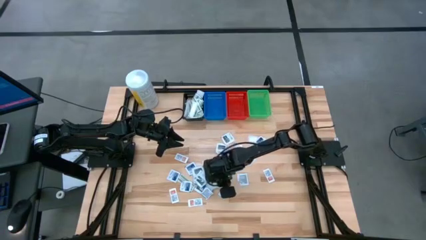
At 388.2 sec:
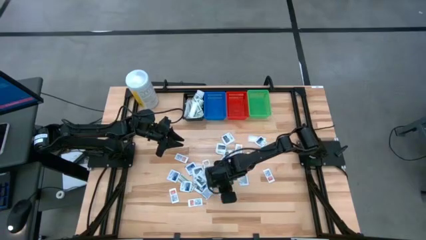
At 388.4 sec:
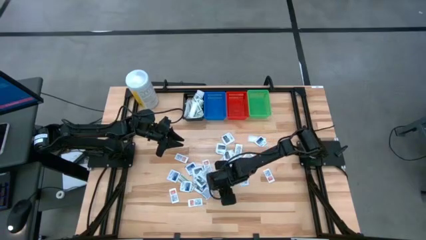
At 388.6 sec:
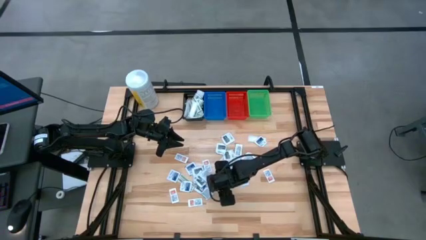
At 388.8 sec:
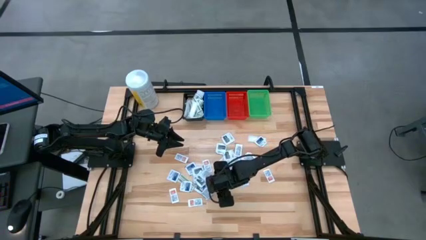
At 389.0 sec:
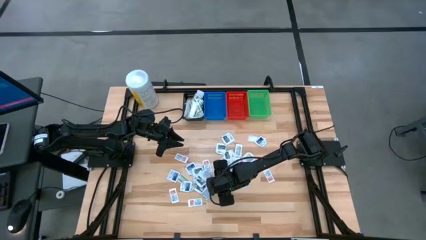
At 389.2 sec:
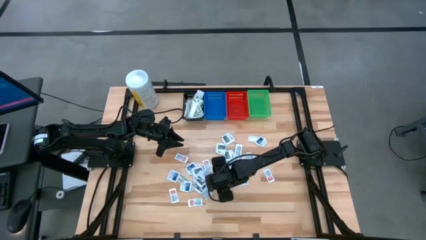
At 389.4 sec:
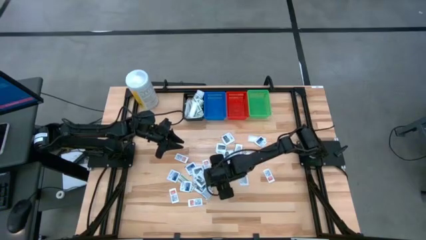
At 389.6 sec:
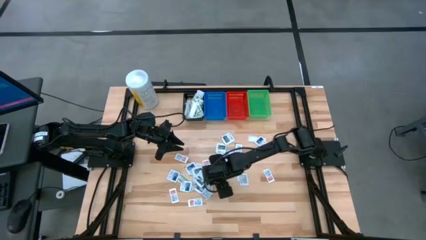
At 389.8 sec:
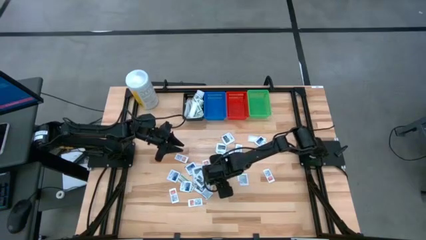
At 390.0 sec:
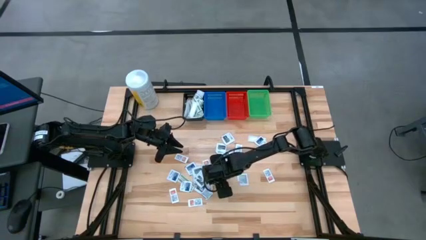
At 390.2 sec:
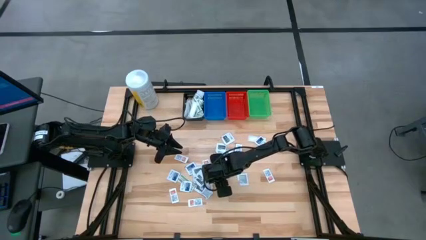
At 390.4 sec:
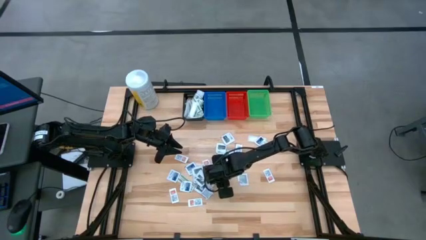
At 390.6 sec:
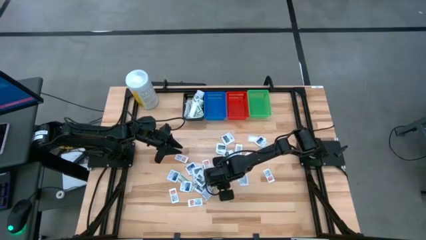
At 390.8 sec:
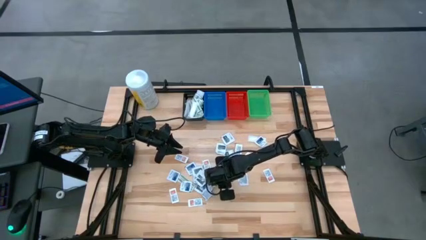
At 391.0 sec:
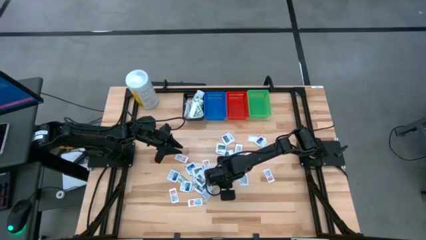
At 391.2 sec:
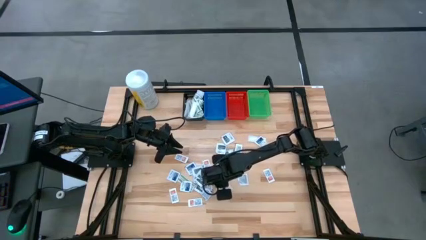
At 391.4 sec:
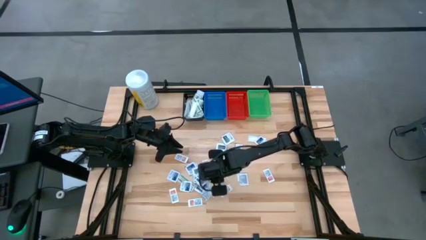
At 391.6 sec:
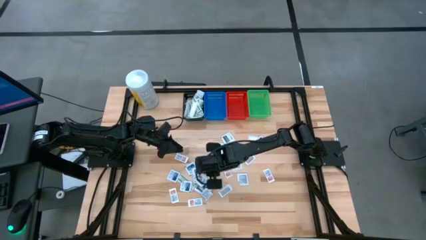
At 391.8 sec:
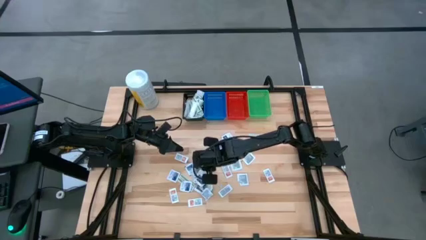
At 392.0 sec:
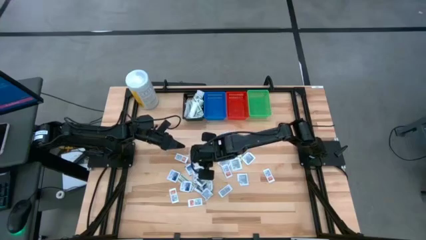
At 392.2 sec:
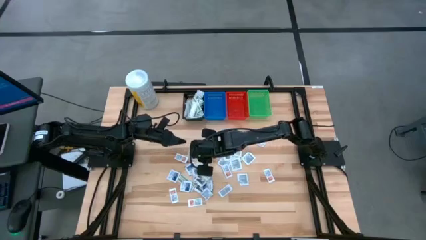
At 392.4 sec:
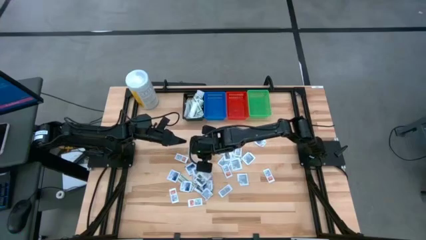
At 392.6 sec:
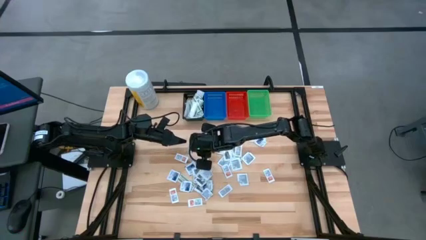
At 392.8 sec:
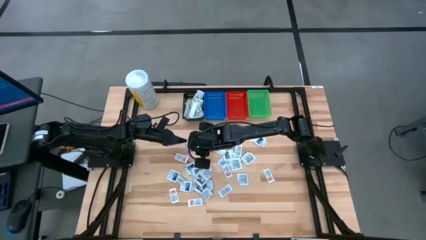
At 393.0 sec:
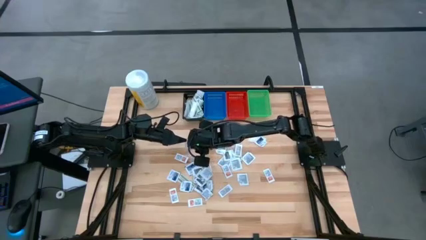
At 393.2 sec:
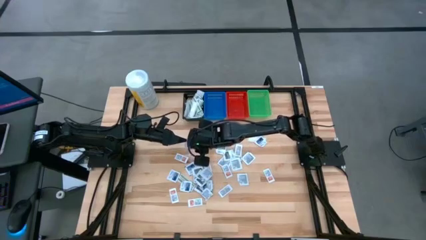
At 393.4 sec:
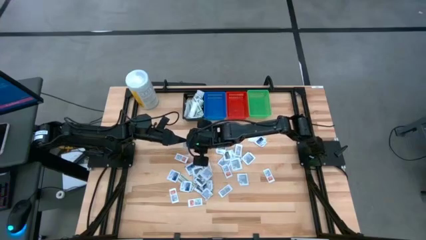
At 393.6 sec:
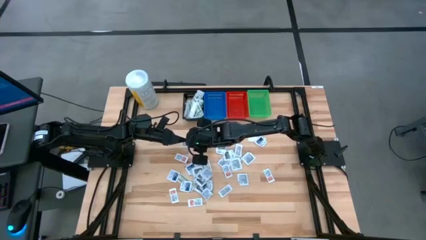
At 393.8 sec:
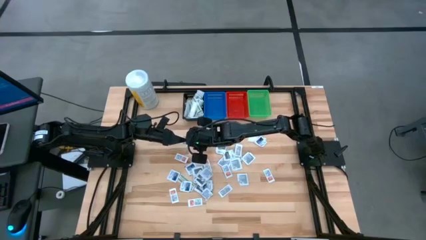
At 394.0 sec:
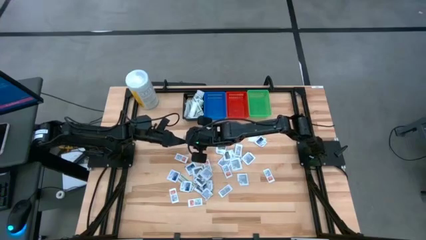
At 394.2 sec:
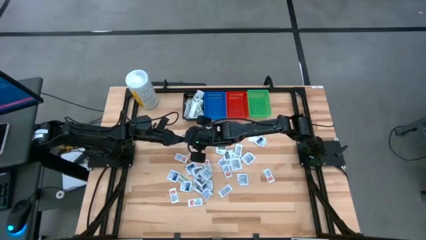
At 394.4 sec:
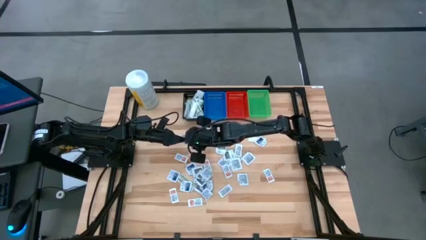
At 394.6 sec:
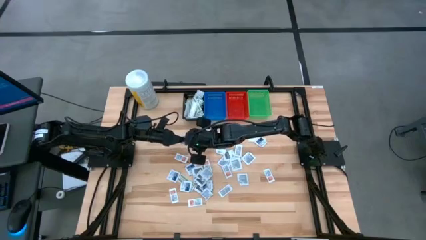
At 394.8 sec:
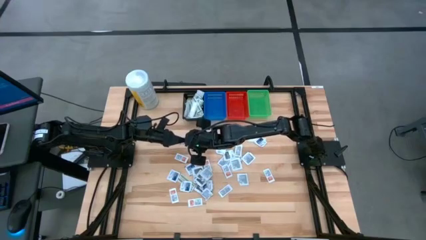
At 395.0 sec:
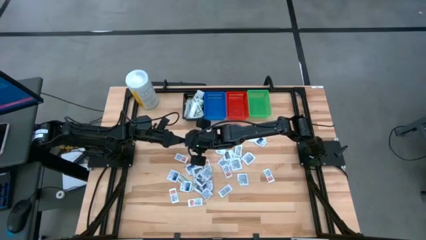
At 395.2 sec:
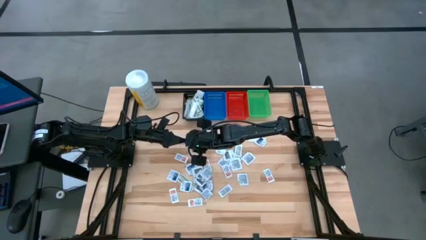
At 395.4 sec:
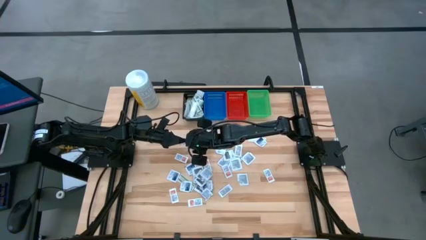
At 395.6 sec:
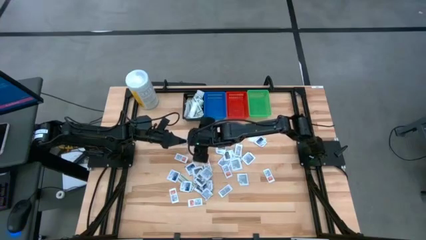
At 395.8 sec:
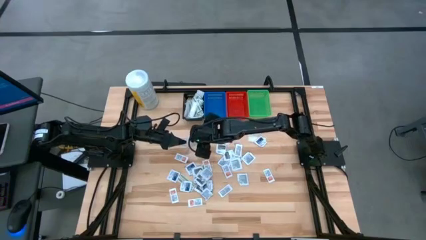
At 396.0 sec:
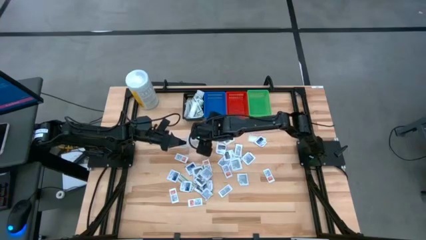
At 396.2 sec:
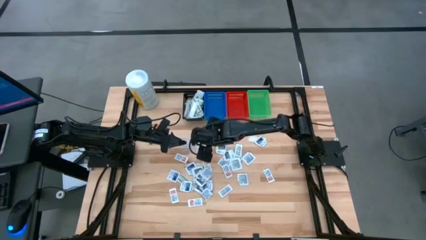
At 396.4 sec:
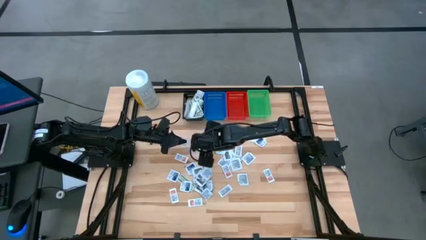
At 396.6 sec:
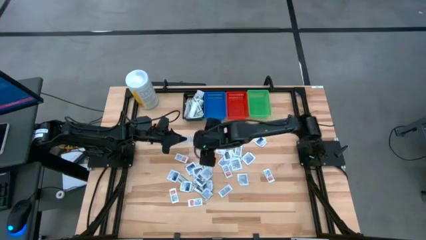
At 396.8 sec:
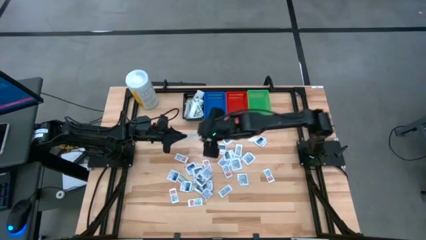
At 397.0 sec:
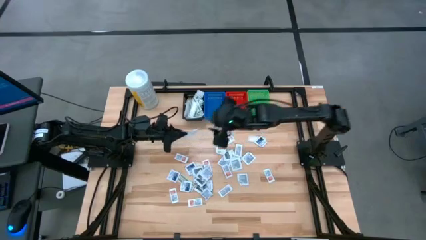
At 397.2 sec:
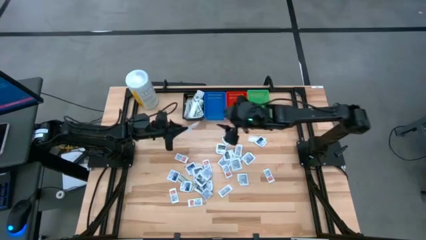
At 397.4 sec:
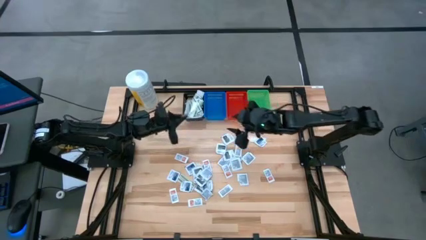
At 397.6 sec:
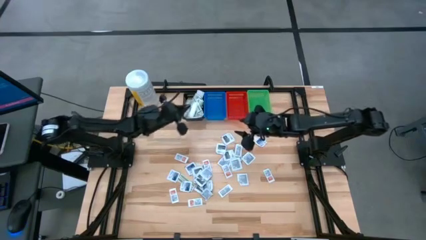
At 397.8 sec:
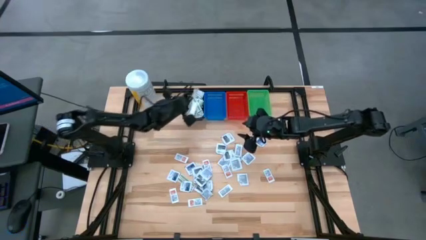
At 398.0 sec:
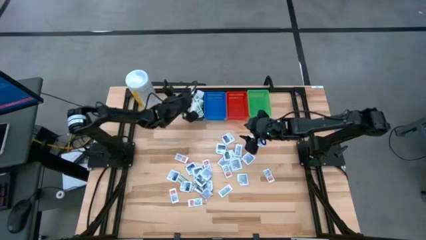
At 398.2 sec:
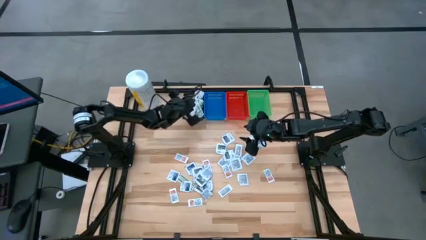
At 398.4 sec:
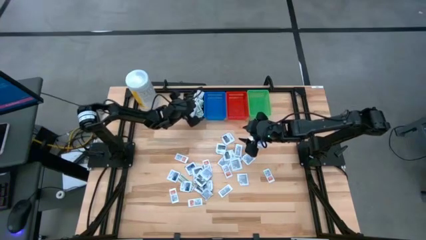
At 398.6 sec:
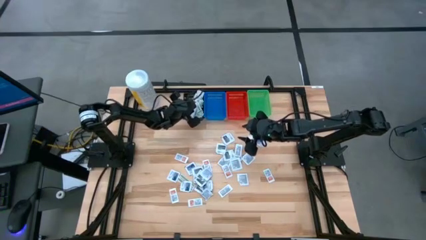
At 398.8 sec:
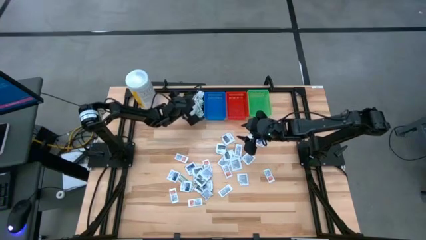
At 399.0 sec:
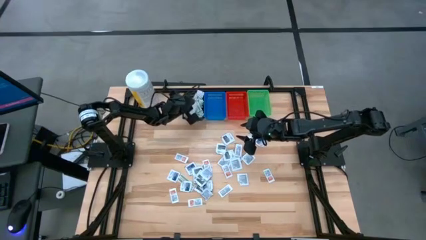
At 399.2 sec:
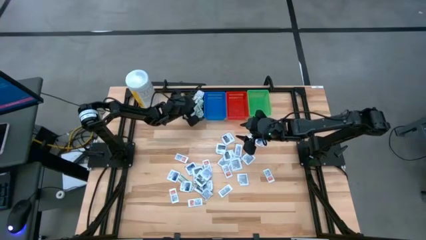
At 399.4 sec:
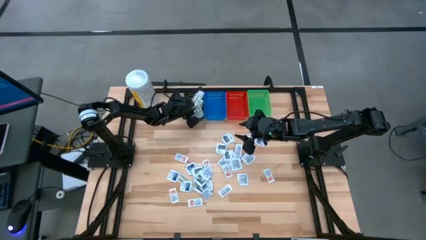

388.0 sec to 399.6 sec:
Task: Pick & Place First Aid Supplies
Put the green bandage pack in the black bin
